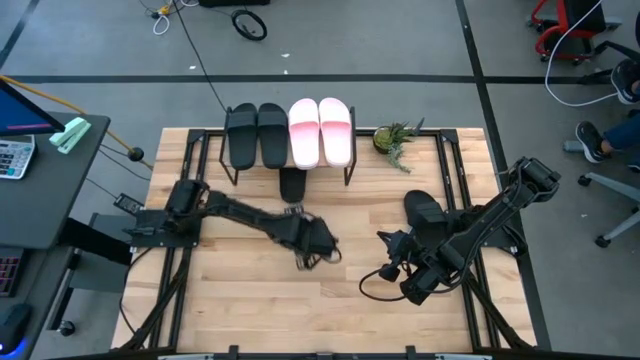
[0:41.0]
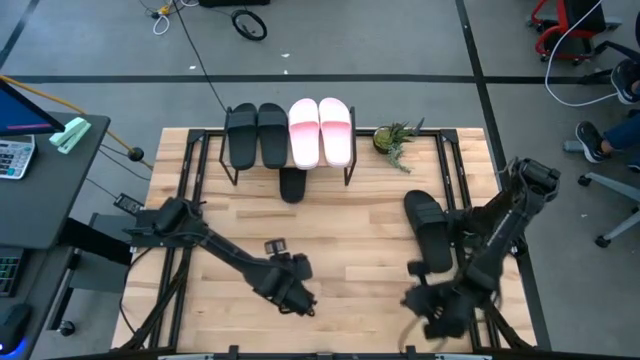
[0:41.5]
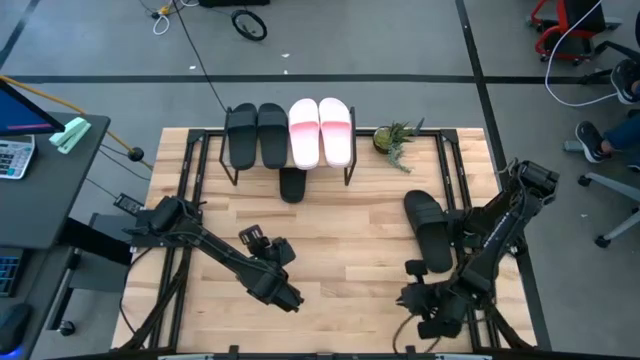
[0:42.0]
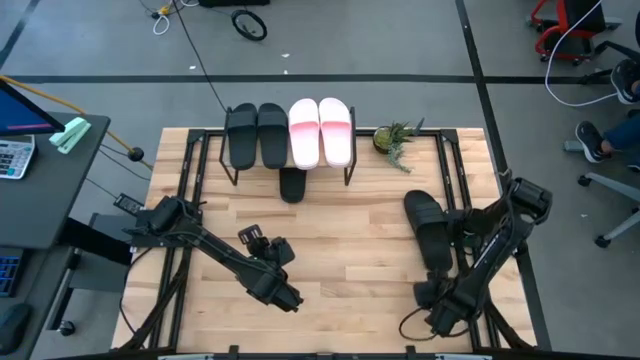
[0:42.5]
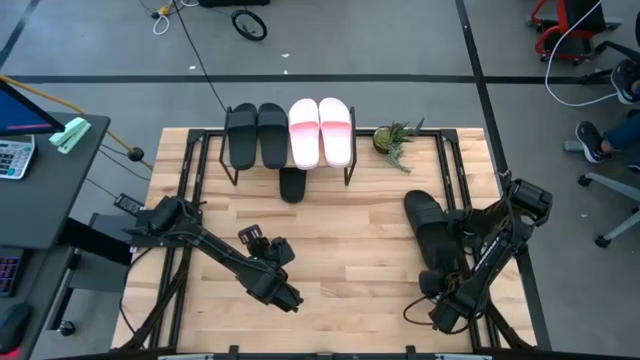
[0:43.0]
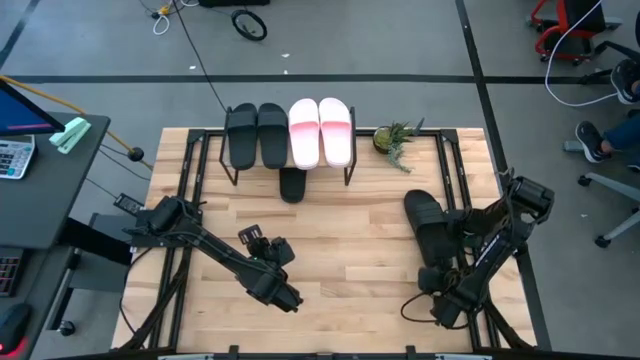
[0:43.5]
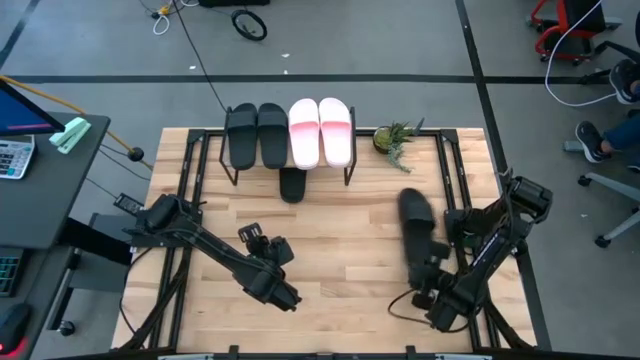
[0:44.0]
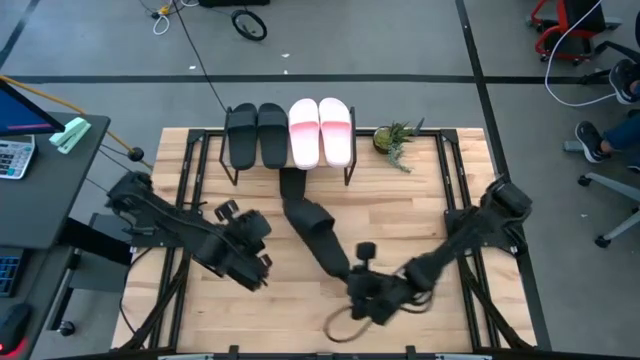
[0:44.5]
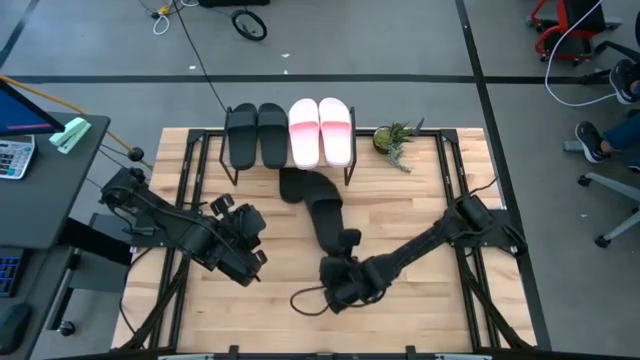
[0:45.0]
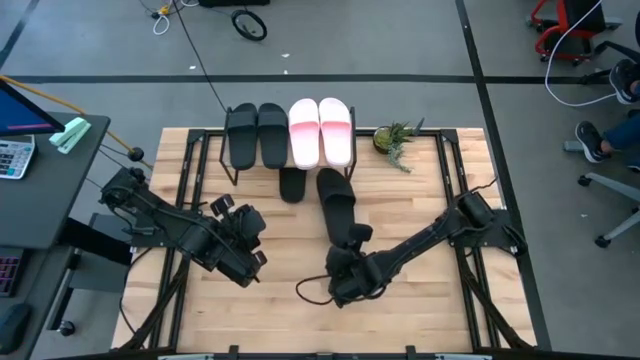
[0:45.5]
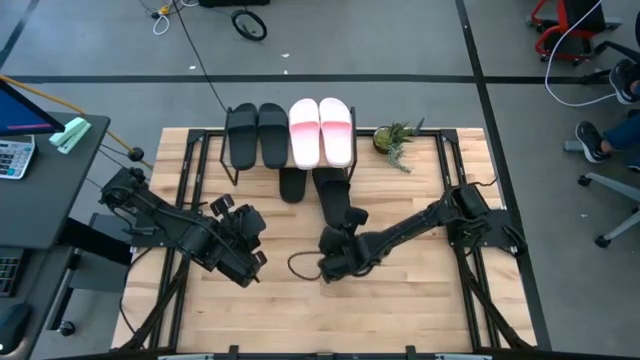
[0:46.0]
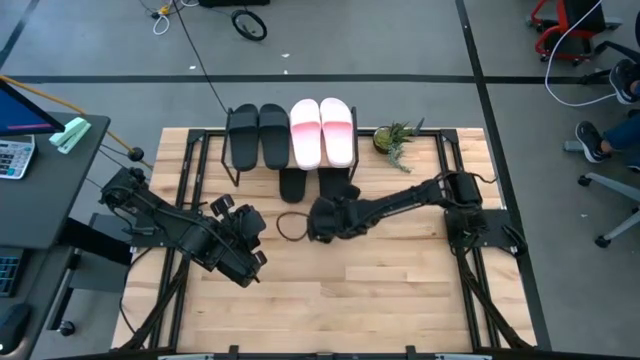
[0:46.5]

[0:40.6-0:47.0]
Task: Pick and place slides into the shelf
Put the black slipper under the shelf

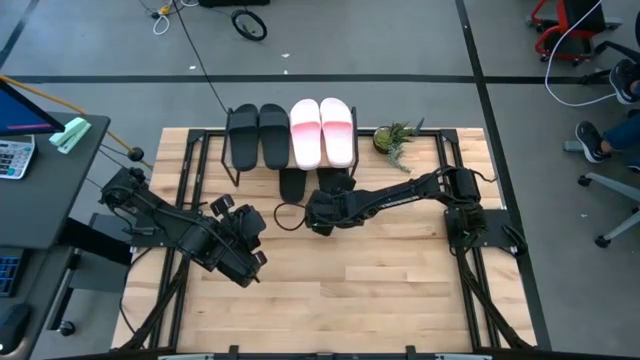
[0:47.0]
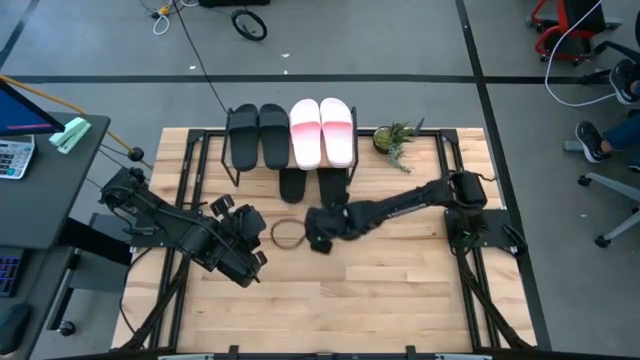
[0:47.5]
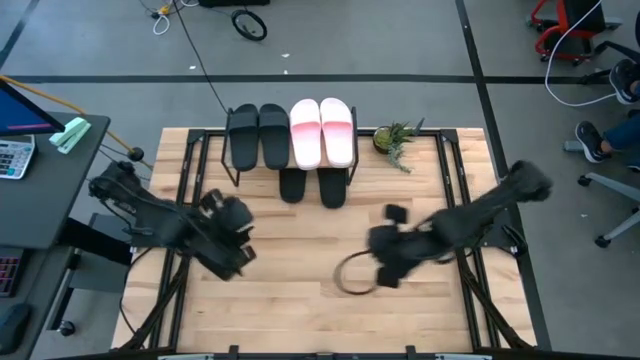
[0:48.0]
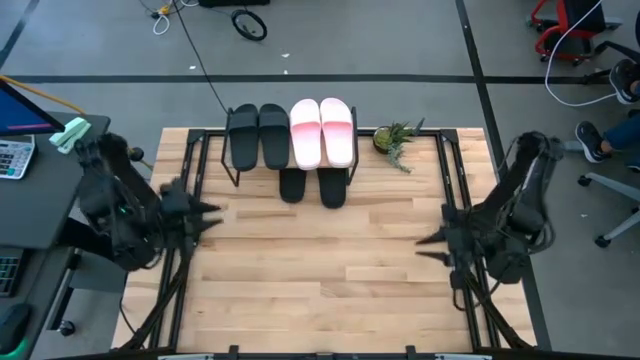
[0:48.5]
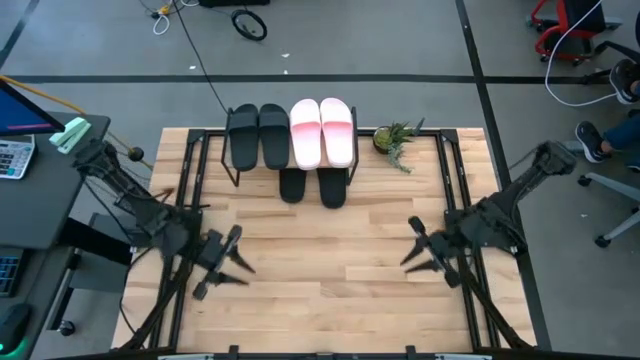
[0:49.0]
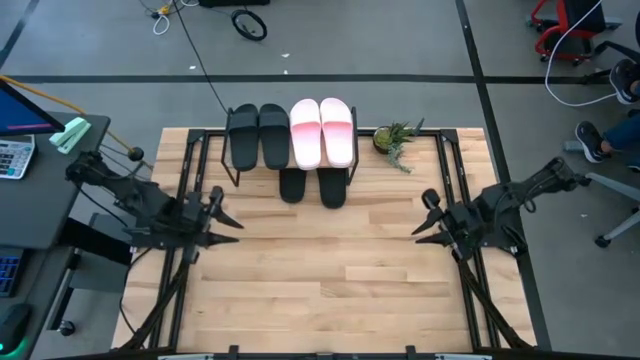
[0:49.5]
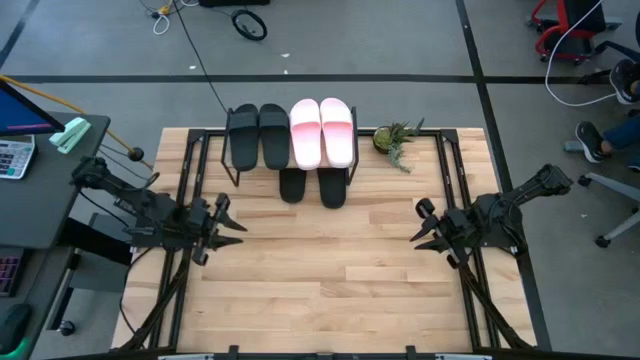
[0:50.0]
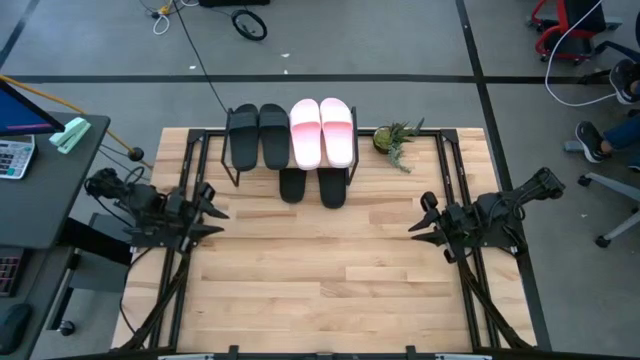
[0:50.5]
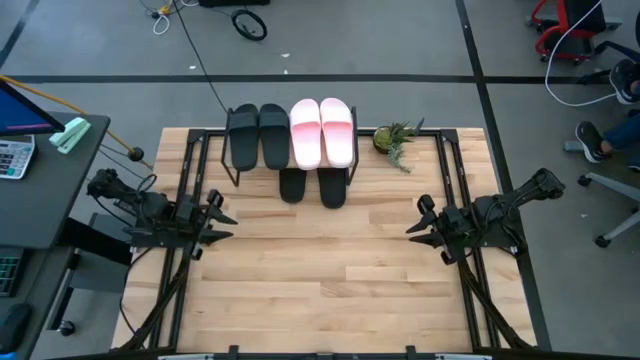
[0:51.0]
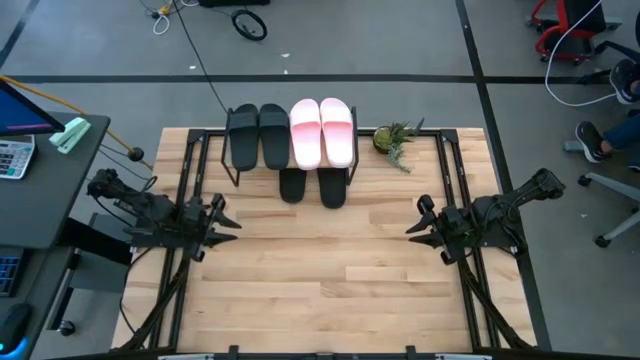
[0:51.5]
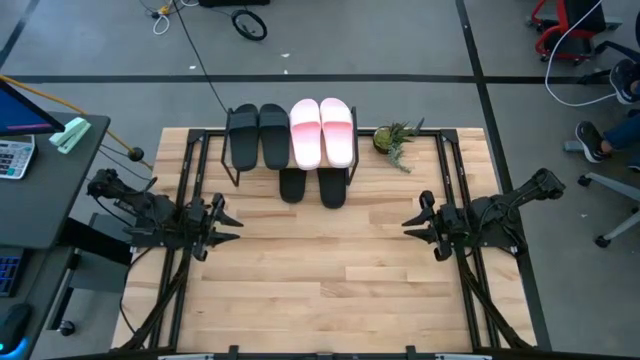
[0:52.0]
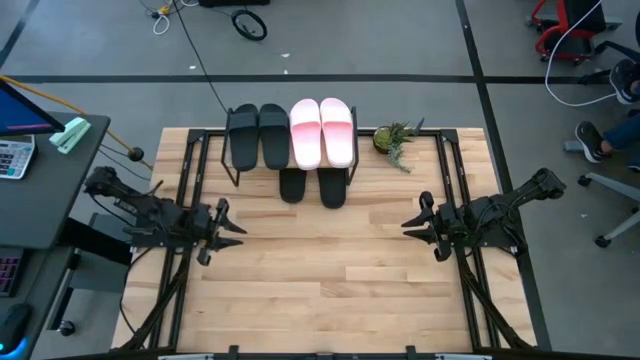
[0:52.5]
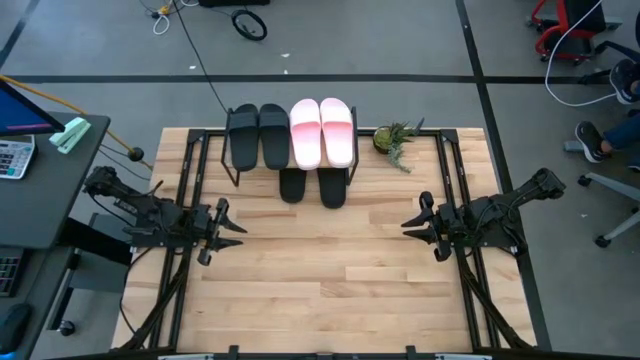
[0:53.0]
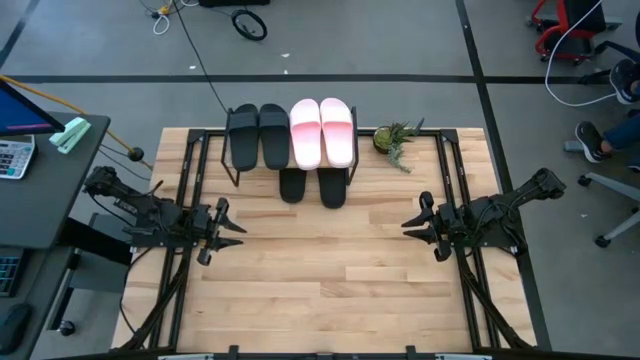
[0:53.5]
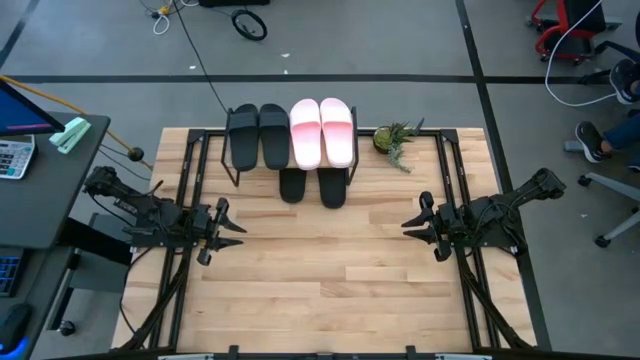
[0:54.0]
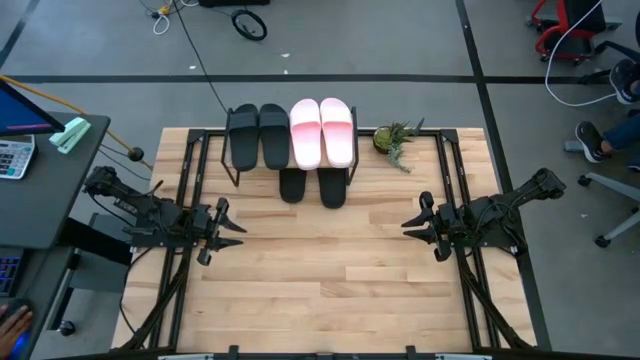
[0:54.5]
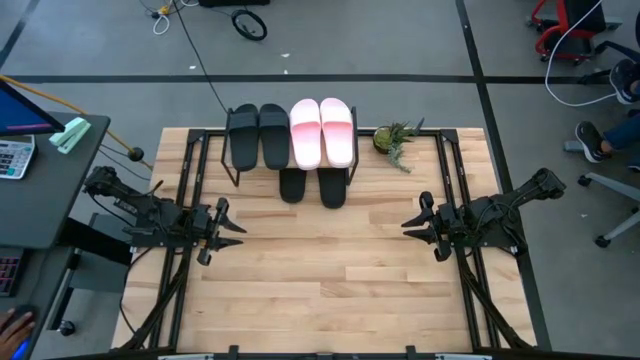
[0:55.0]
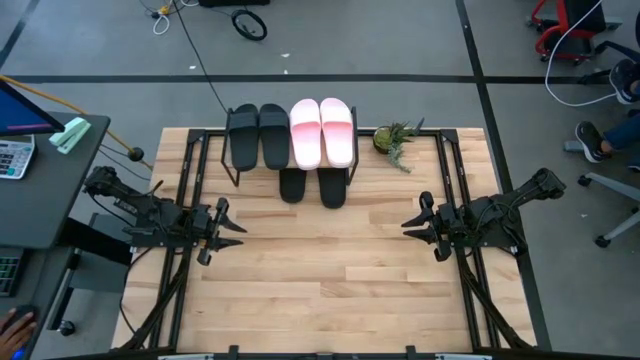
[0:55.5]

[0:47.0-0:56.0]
Return to Home Position

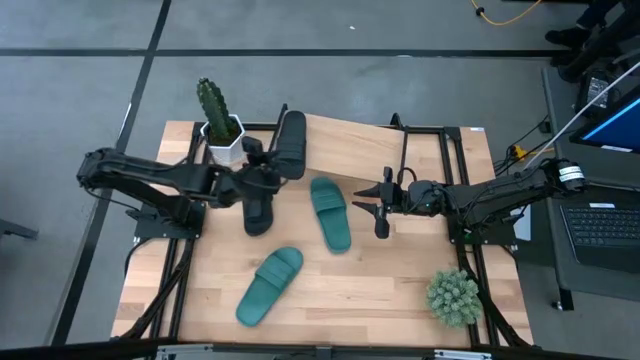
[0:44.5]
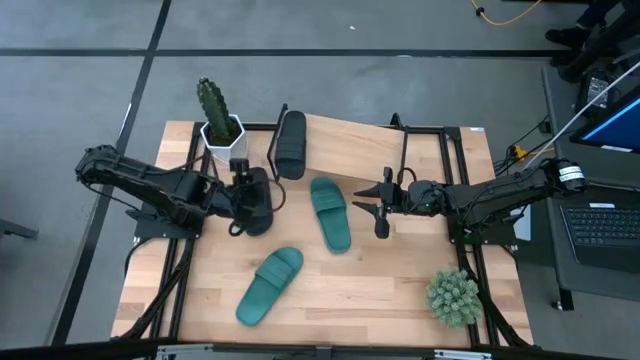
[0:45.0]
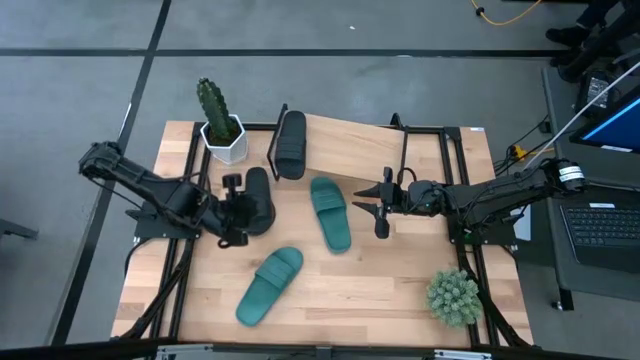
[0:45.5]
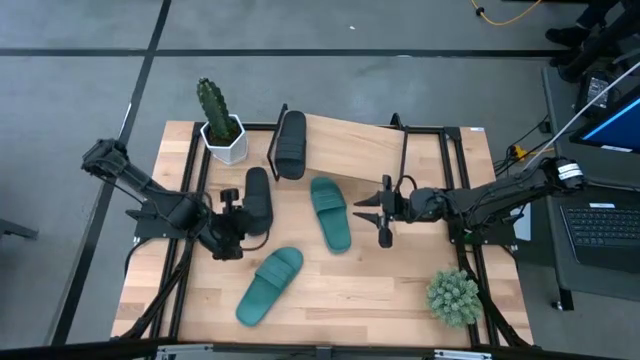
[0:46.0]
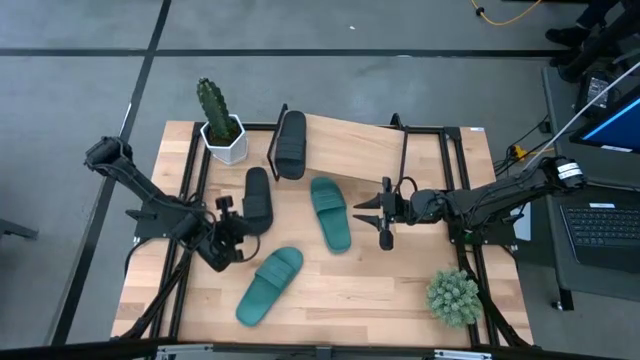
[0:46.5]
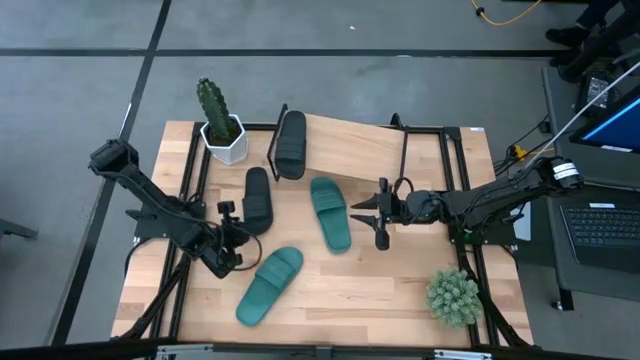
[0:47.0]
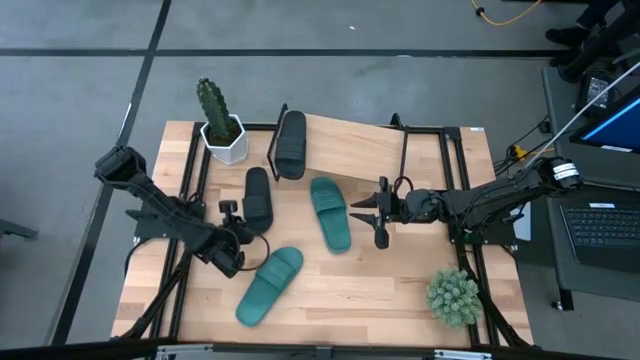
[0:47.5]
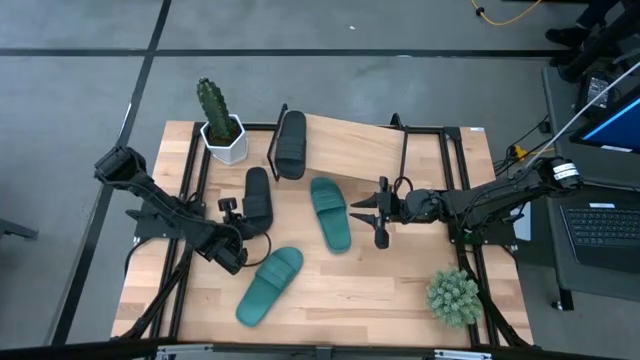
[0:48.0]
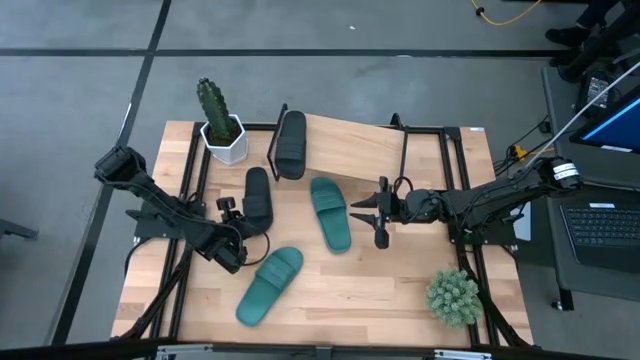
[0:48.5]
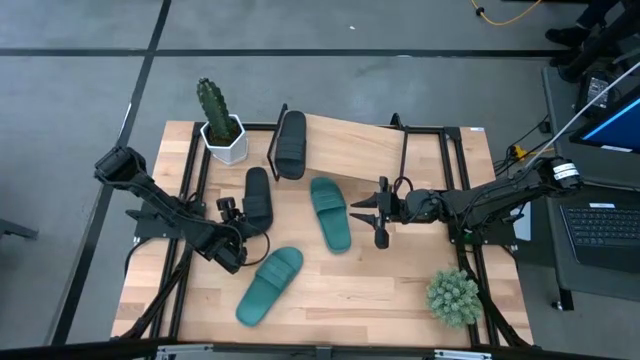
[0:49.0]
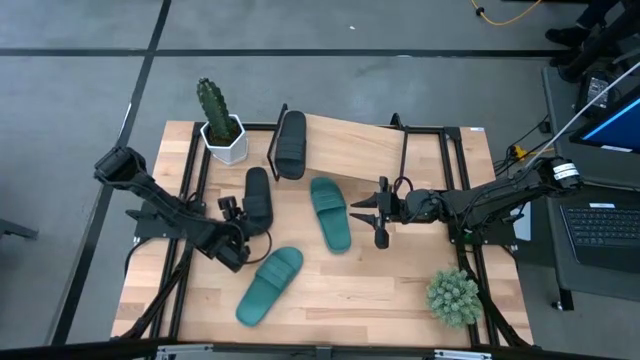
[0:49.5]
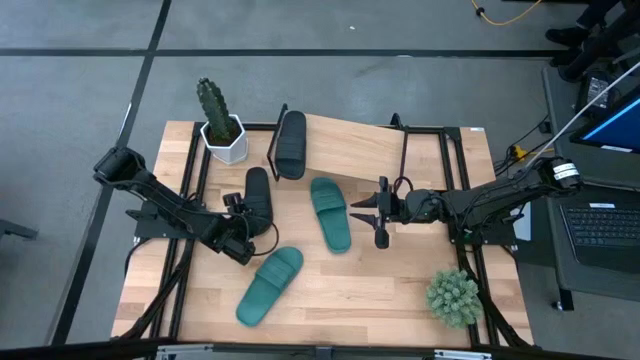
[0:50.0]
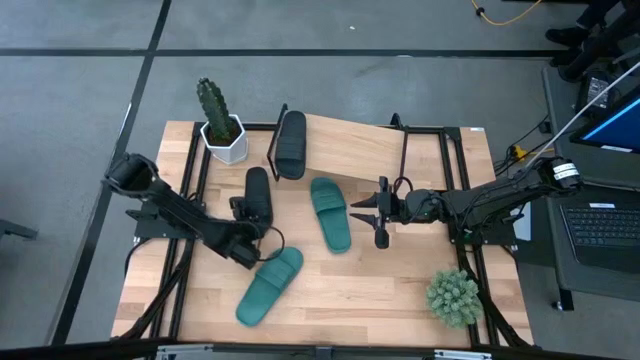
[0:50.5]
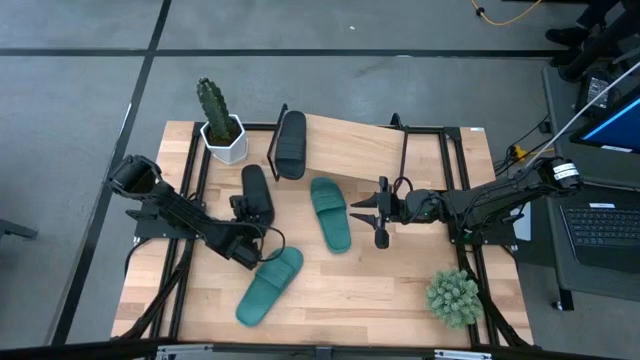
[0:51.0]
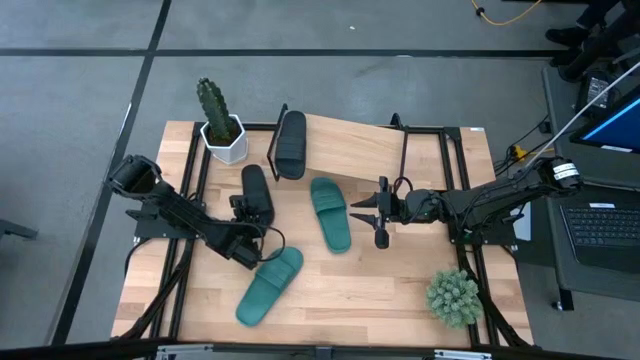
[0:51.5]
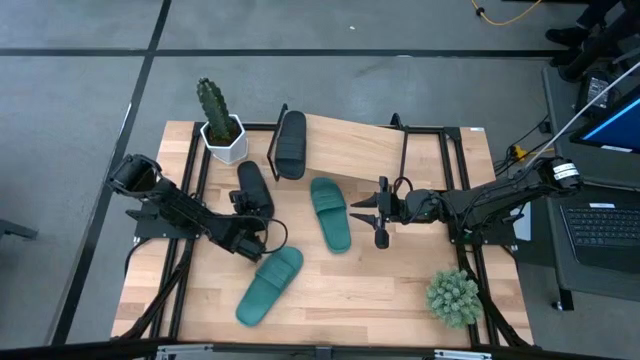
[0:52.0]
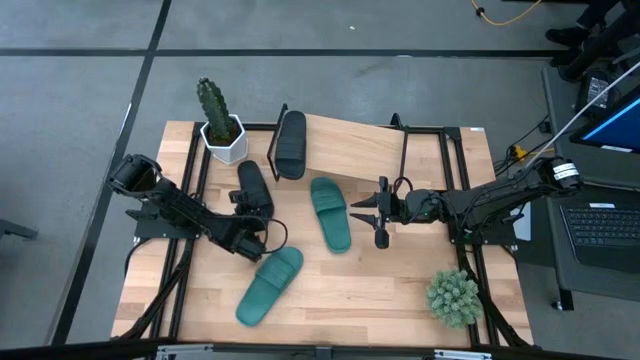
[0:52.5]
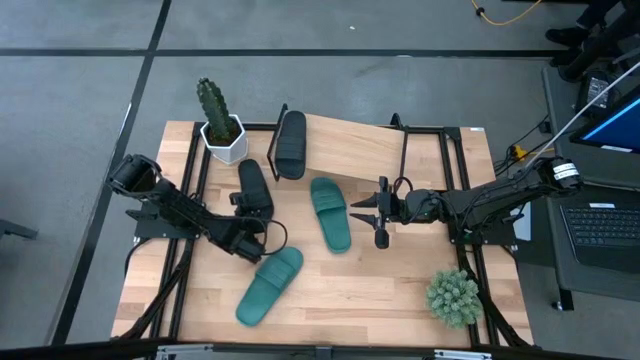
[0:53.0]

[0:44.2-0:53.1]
Task: Pick and place slides into the shelf
Put the black slide on the shelf
